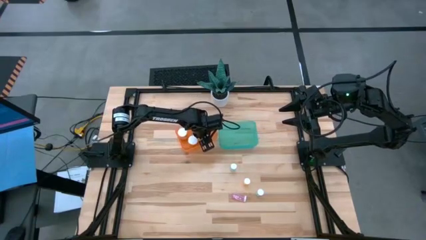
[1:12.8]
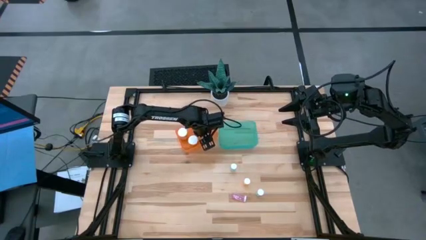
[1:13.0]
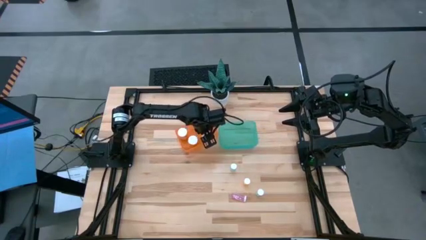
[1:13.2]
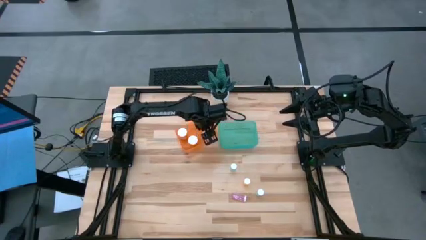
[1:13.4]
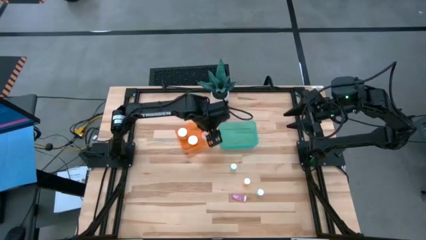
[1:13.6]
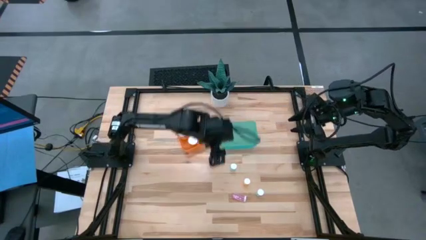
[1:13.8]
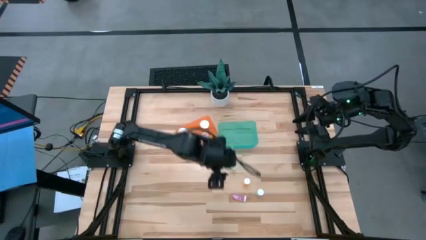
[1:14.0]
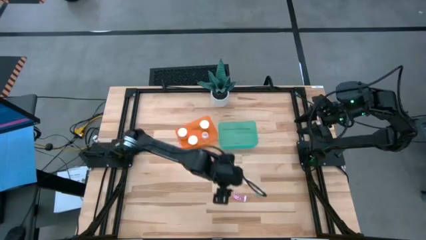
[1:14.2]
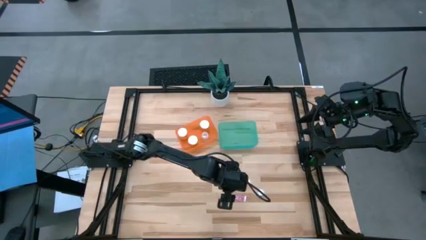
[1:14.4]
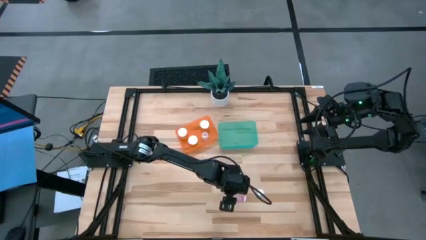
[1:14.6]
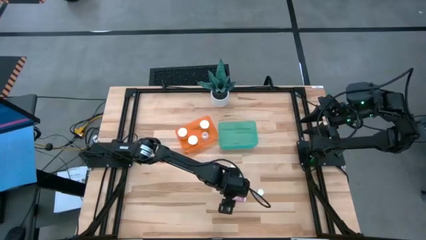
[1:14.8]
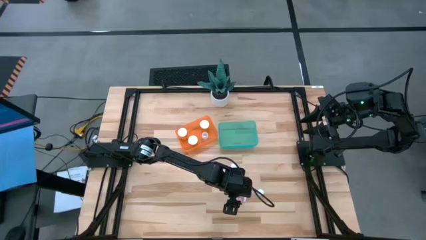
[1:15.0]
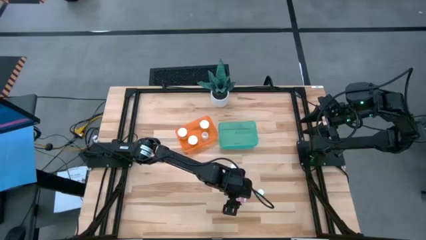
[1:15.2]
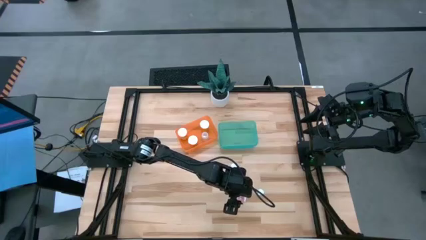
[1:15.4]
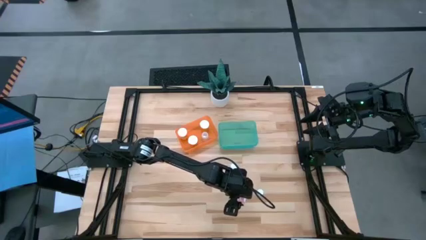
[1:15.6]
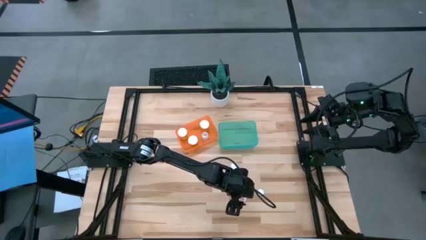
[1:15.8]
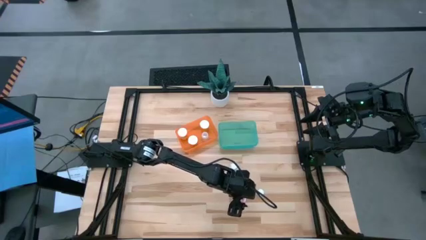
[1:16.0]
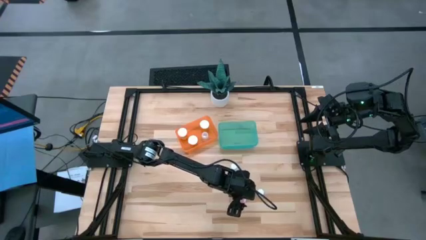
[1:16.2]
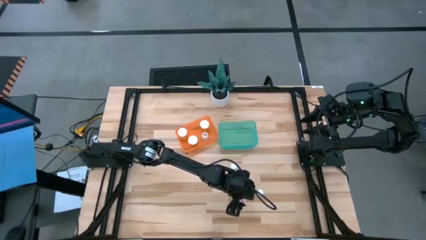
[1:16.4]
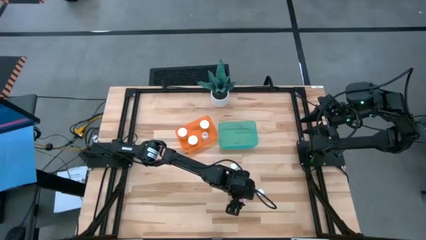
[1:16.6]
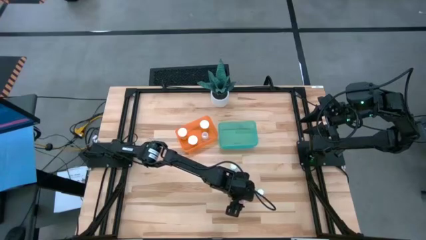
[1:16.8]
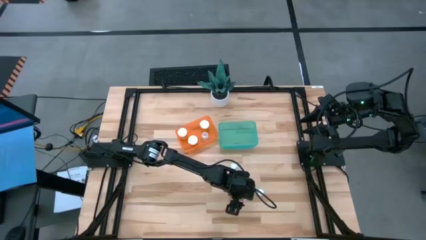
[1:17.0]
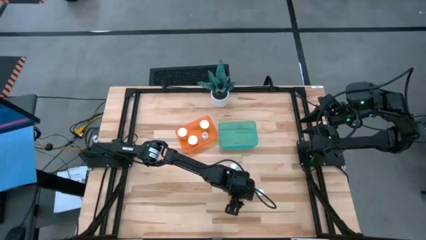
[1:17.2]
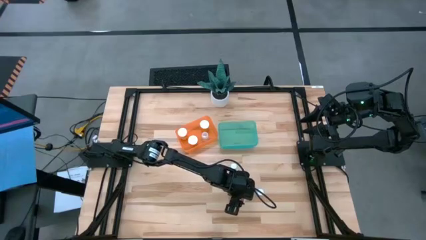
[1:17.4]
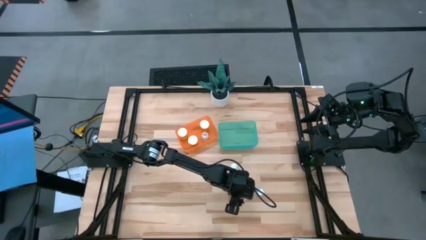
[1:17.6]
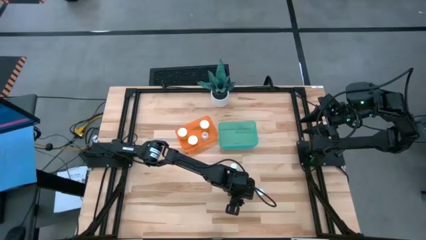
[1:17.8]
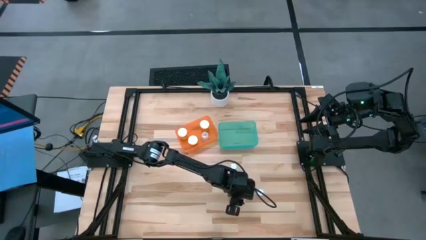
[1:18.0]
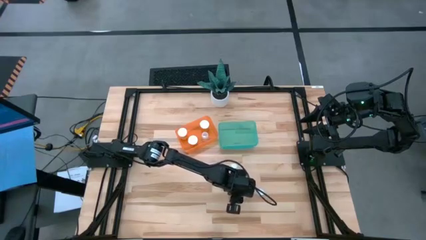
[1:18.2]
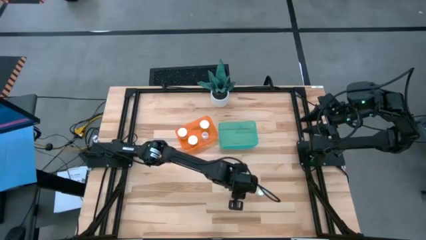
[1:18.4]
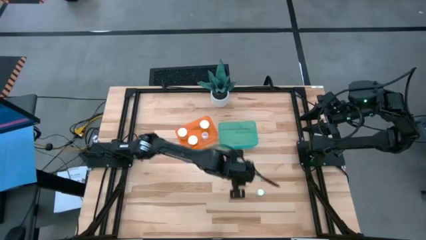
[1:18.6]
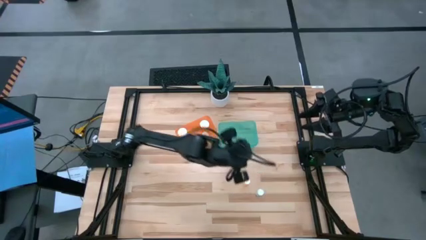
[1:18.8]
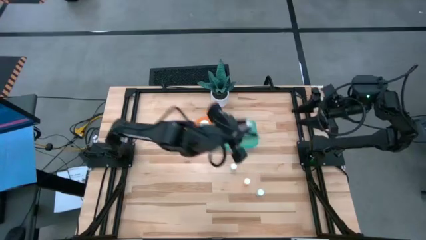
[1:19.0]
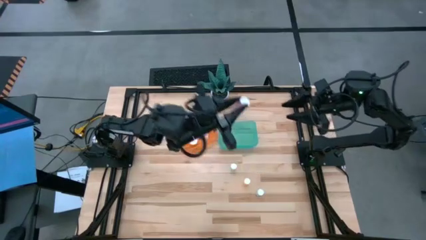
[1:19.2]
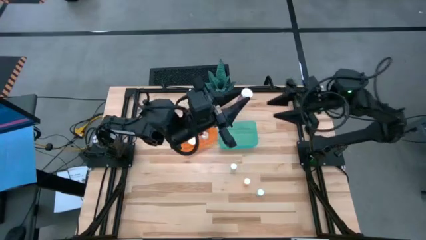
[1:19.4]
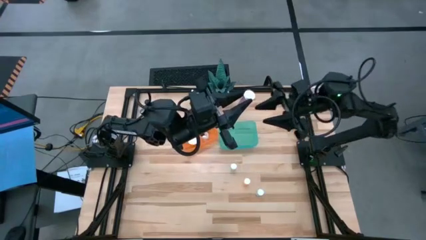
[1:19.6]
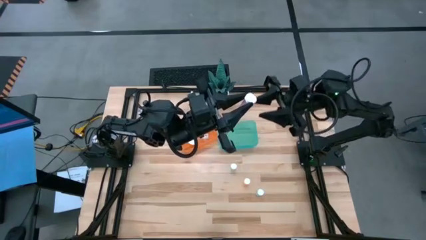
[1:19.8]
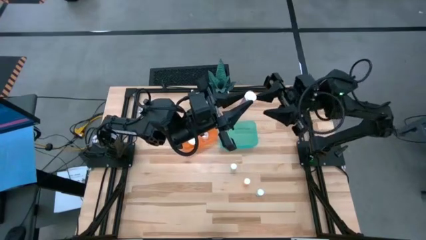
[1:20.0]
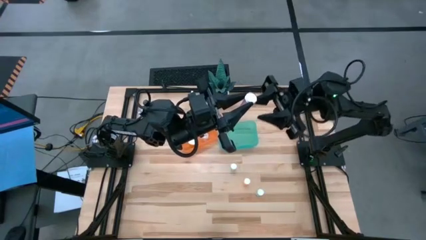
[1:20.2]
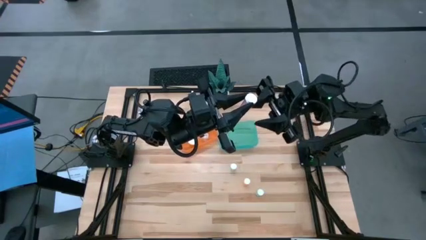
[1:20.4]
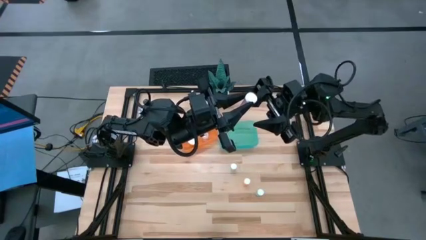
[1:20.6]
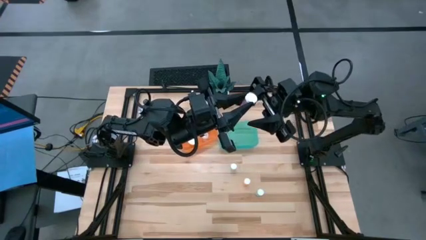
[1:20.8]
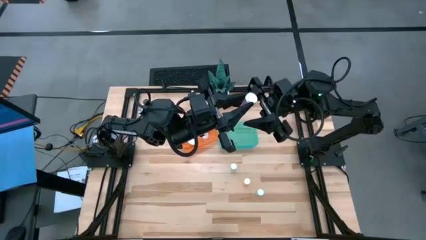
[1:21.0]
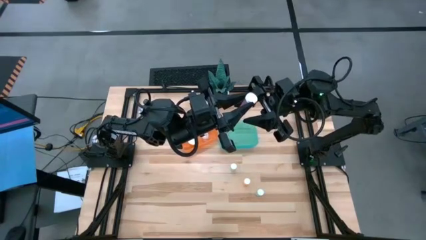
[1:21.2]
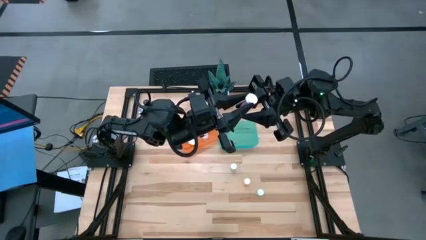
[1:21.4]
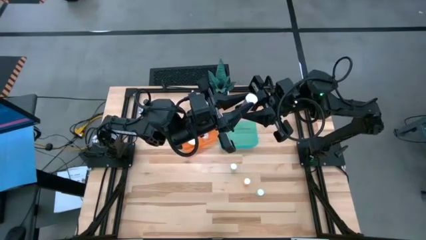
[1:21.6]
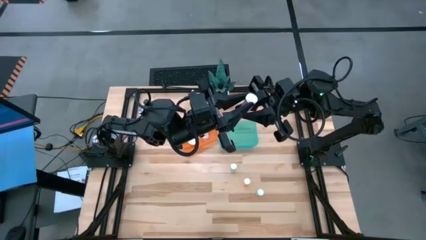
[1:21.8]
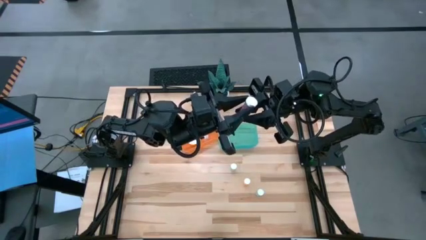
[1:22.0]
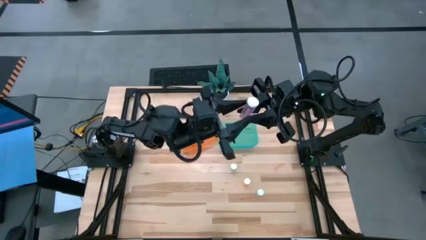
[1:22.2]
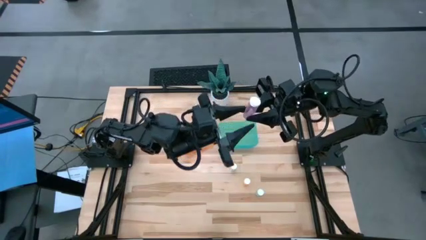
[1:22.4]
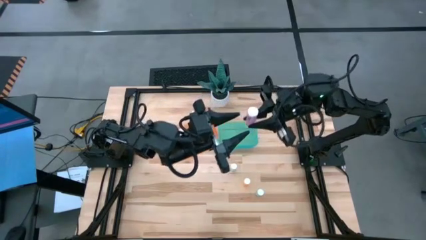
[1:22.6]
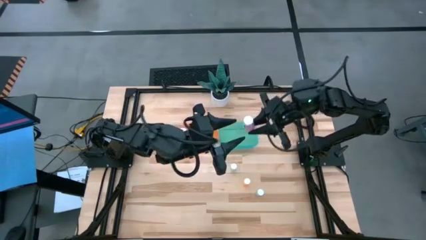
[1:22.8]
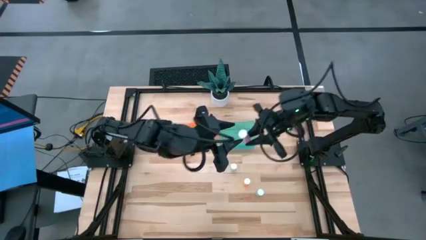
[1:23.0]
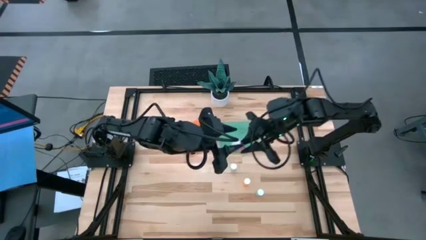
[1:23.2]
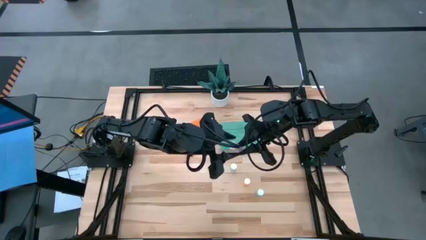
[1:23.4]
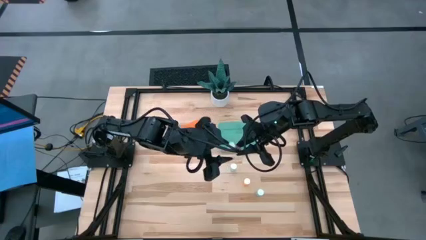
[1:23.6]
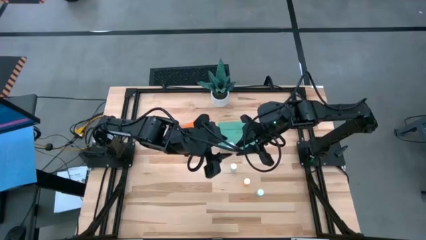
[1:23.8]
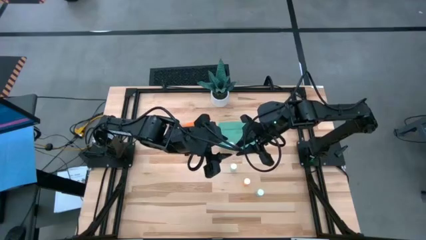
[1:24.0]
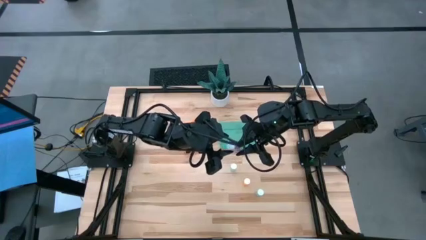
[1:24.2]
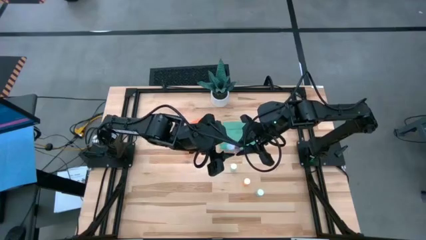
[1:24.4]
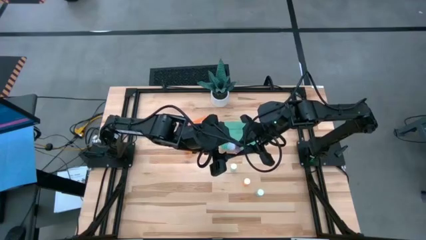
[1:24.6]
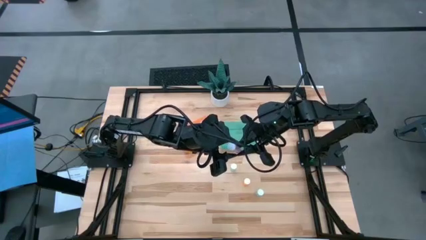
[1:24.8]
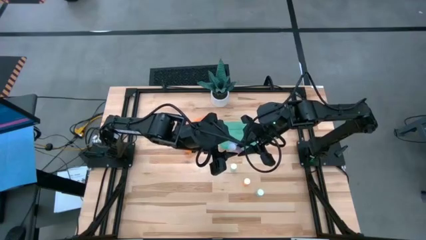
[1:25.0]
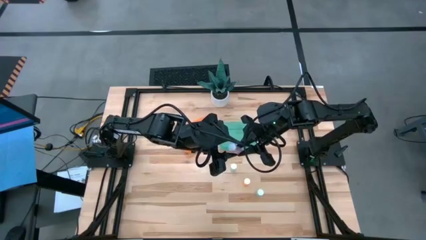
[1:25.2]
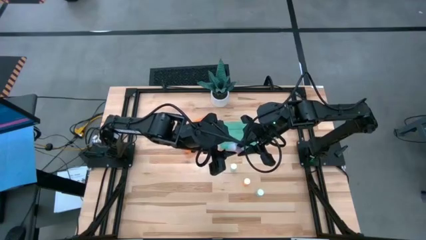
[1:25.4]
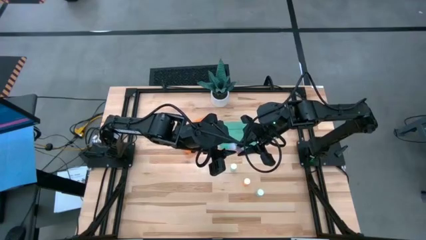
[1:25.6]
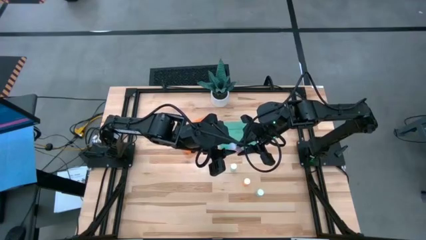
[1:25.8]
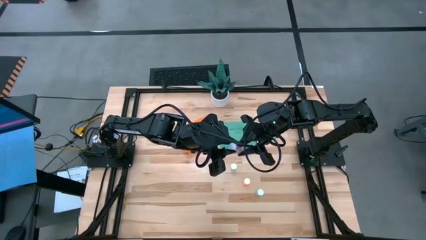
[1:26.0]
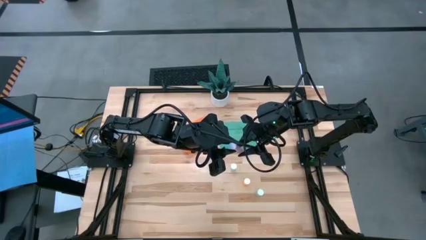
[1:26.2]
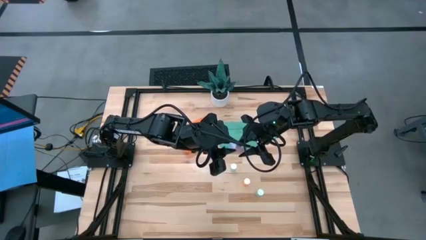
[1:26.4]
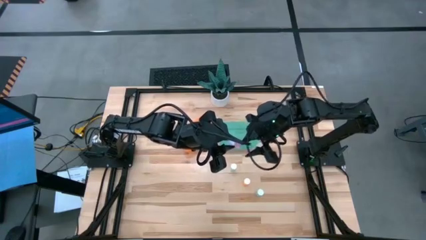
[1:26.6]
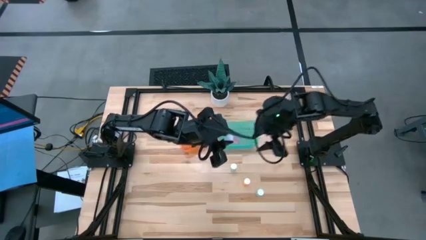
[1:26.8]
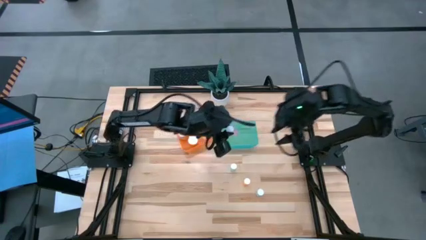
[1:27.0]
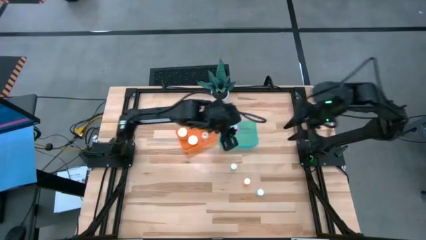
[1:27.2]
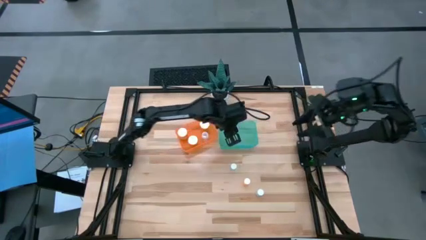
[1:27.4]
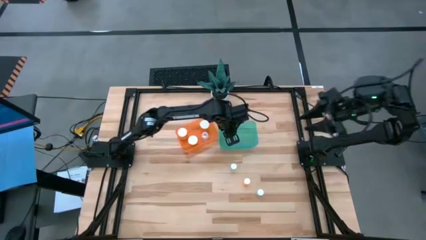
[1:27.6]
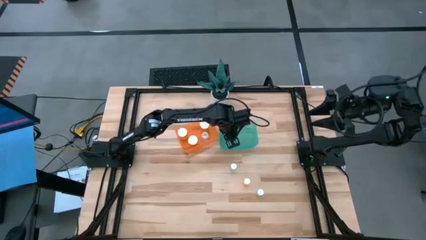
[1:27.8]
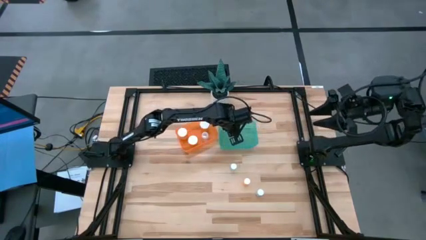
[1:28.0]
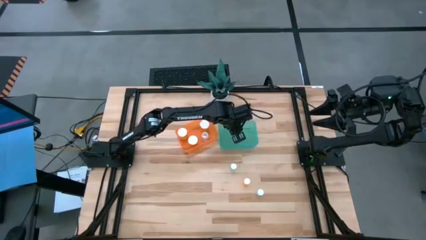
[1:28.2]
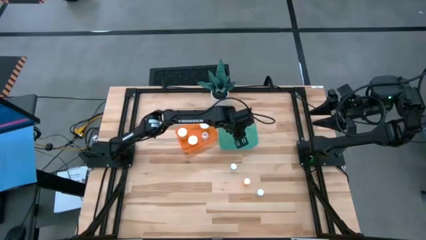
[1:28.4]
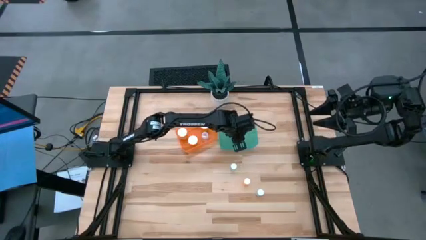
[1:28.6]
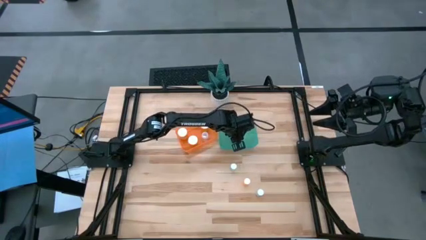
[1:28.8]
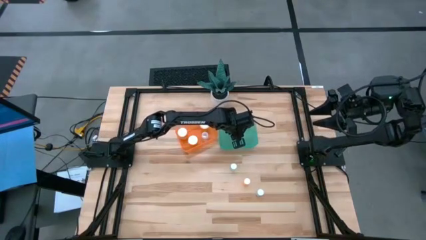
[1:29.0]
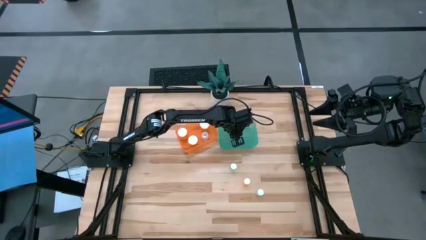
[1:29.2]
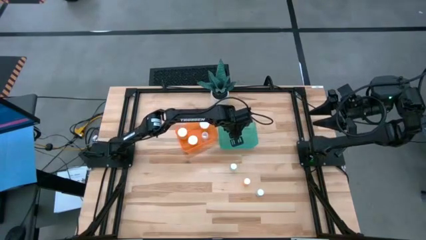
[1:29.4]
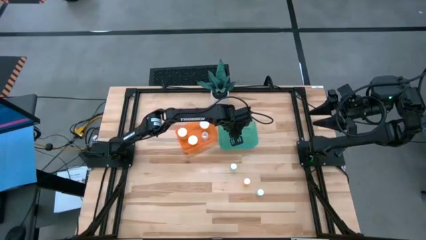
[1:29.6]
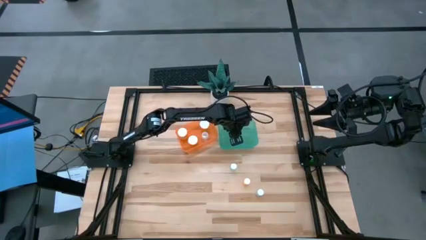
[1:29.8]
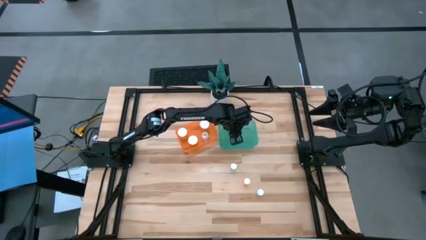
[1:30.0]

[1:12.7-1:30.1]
Task: Pick and place medicine bottles into bin by pill shape (circle, oval)
Put the pink tablet bottle into the blue bin
